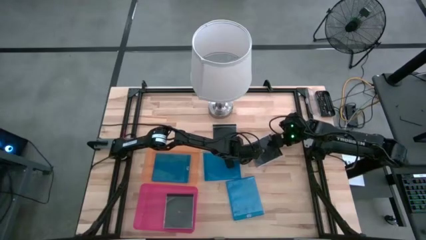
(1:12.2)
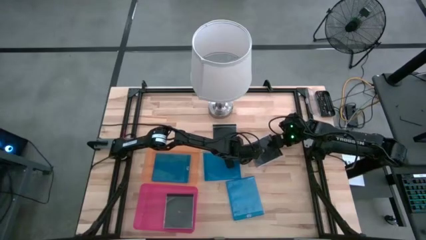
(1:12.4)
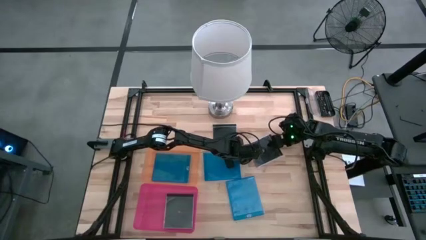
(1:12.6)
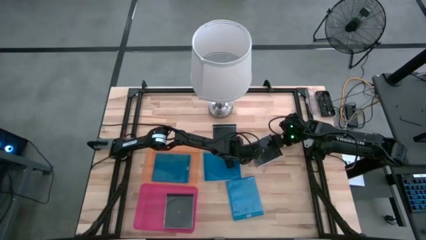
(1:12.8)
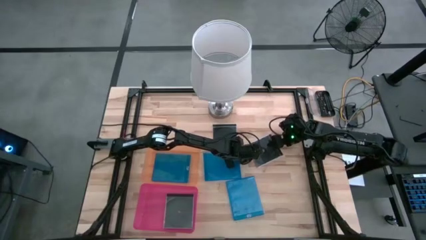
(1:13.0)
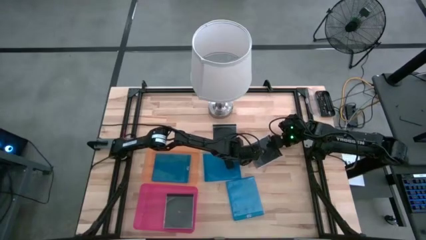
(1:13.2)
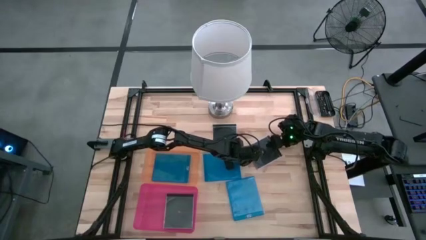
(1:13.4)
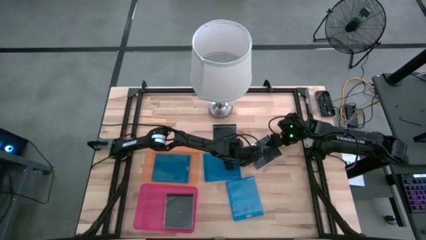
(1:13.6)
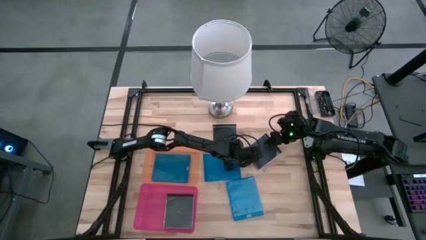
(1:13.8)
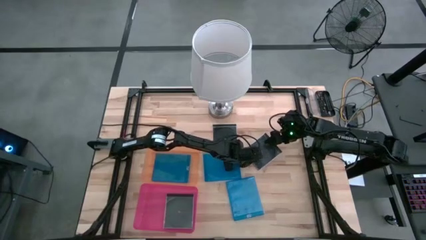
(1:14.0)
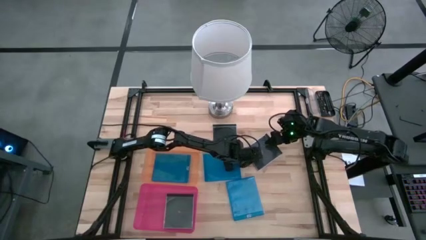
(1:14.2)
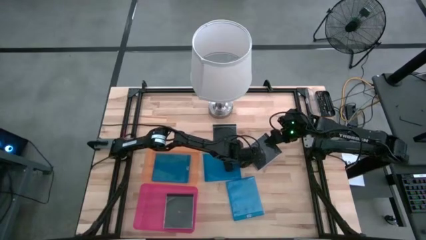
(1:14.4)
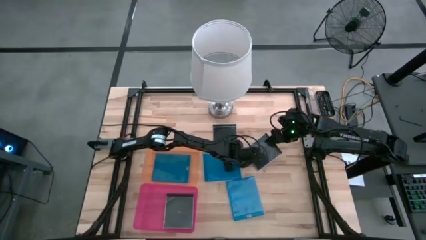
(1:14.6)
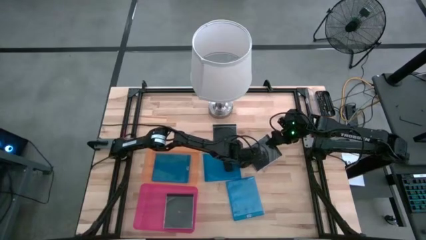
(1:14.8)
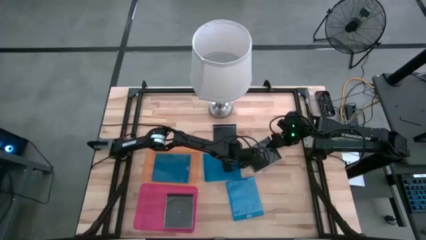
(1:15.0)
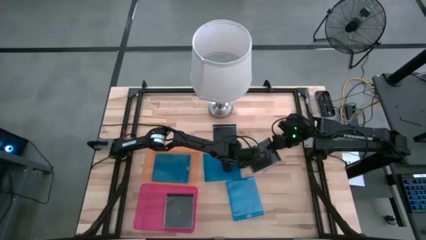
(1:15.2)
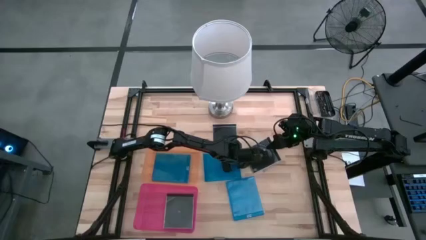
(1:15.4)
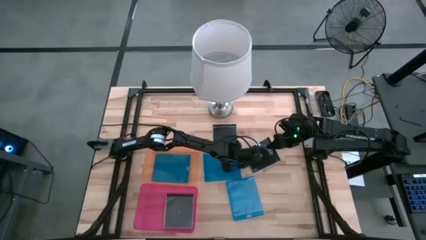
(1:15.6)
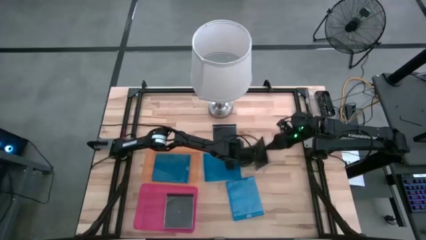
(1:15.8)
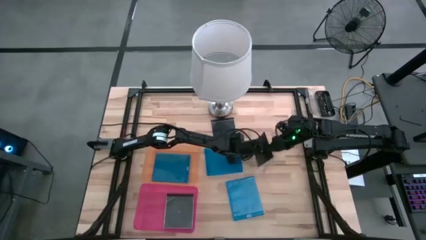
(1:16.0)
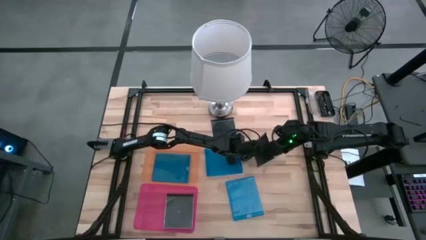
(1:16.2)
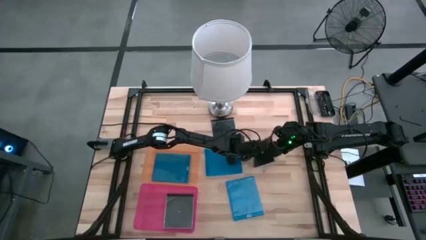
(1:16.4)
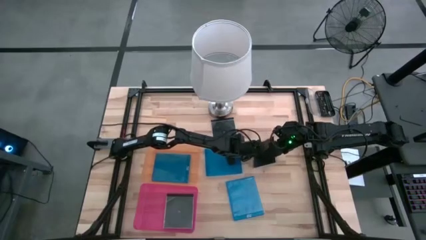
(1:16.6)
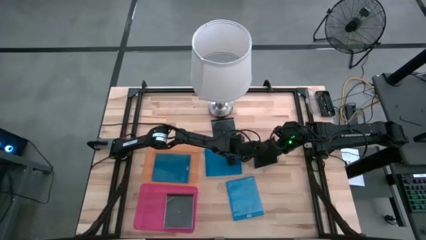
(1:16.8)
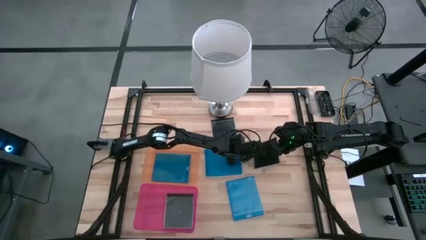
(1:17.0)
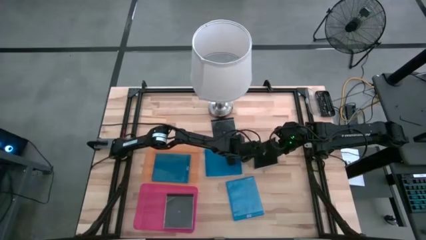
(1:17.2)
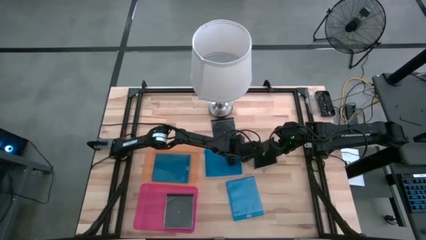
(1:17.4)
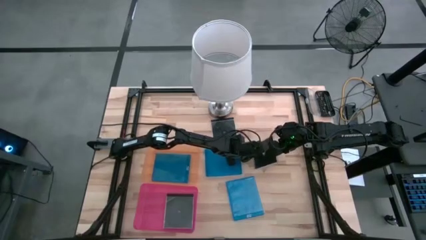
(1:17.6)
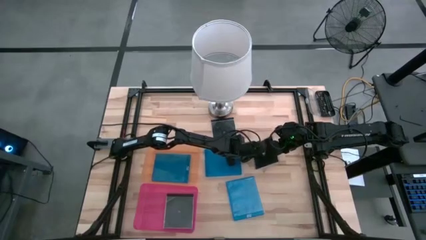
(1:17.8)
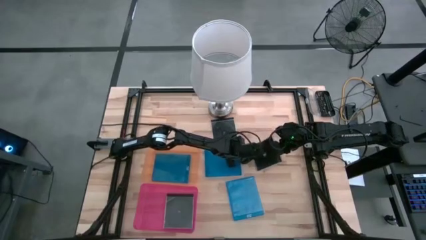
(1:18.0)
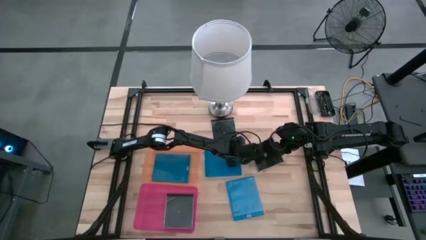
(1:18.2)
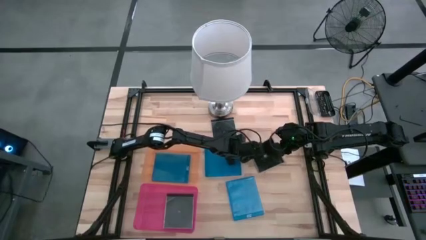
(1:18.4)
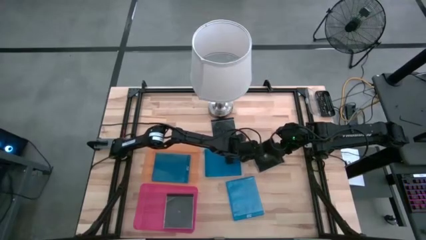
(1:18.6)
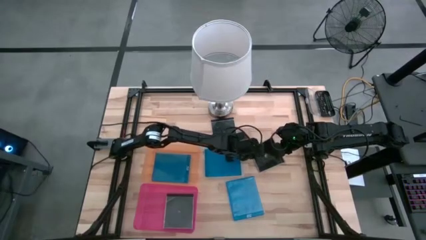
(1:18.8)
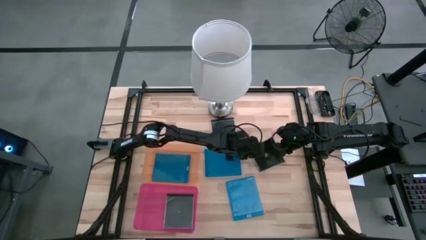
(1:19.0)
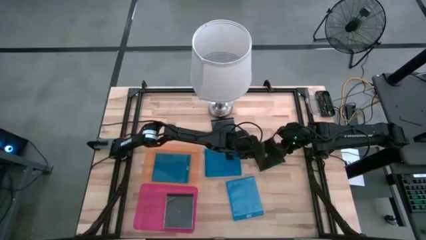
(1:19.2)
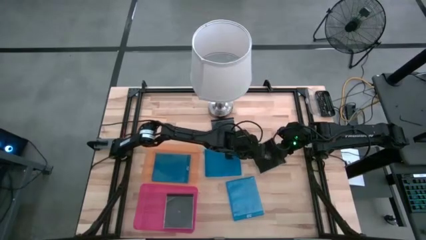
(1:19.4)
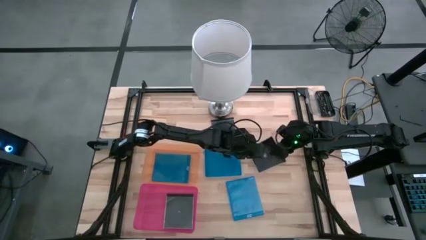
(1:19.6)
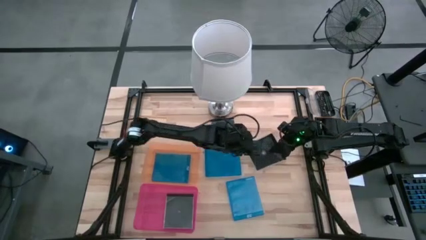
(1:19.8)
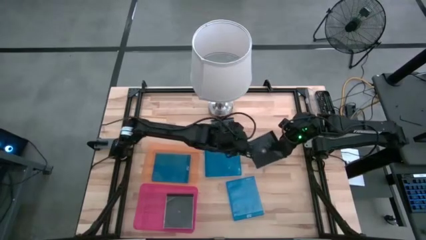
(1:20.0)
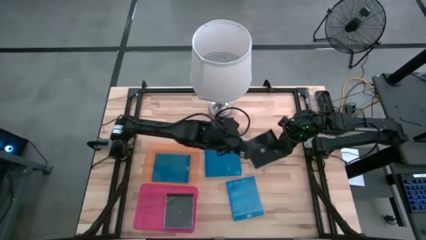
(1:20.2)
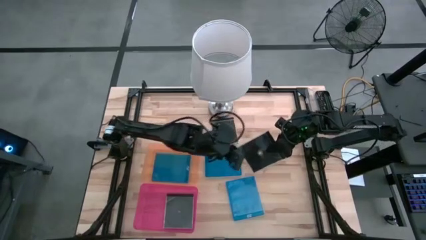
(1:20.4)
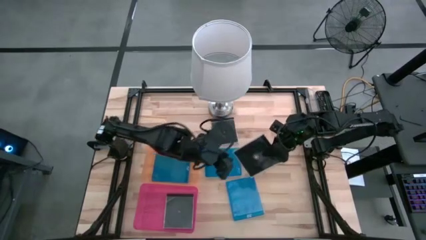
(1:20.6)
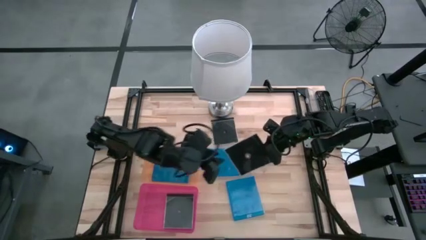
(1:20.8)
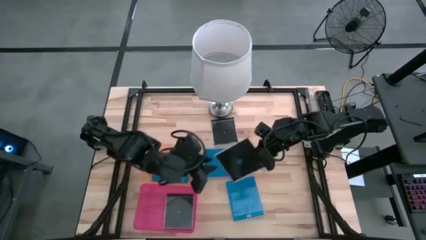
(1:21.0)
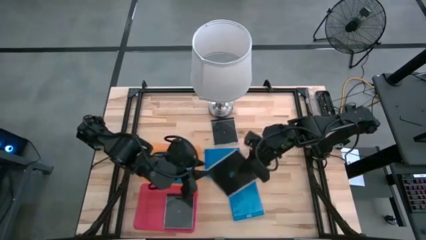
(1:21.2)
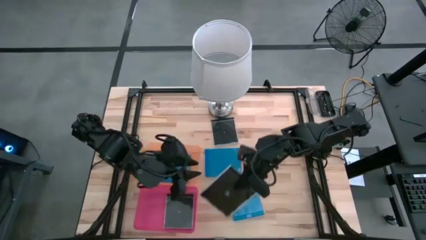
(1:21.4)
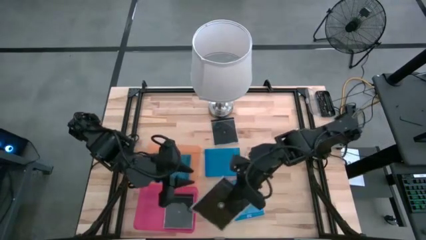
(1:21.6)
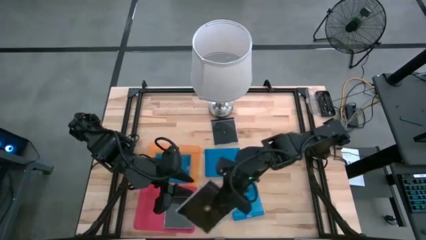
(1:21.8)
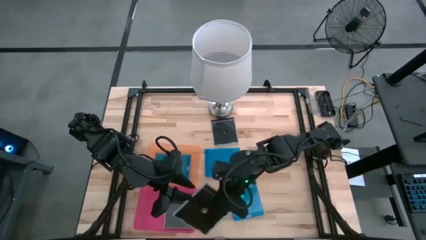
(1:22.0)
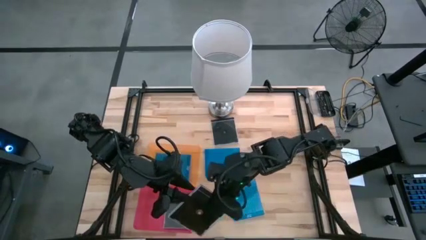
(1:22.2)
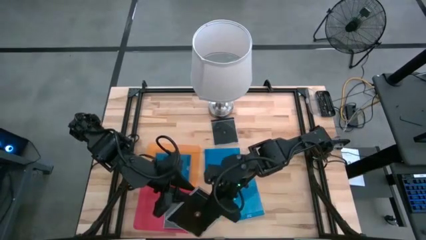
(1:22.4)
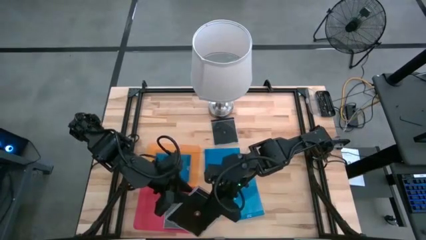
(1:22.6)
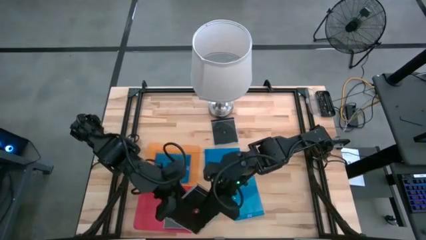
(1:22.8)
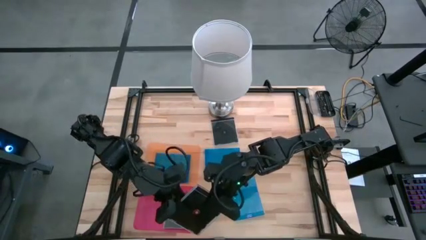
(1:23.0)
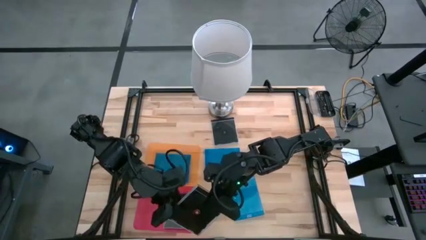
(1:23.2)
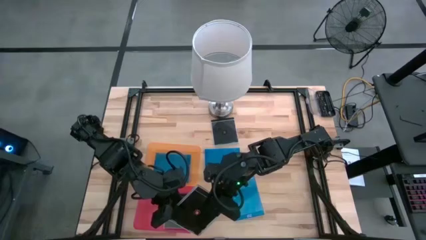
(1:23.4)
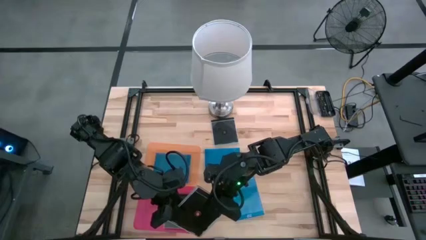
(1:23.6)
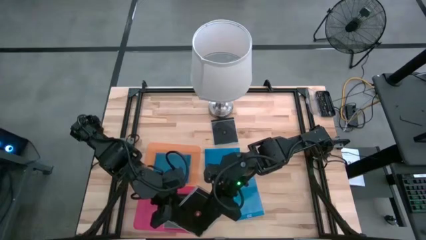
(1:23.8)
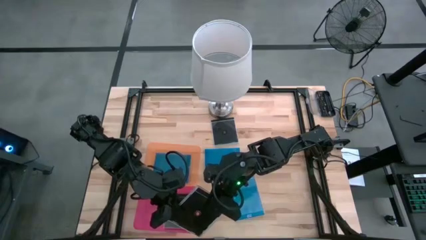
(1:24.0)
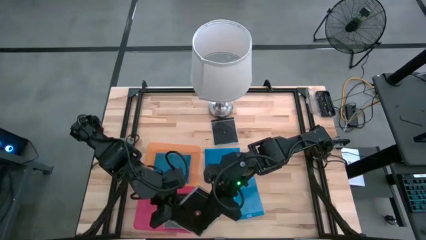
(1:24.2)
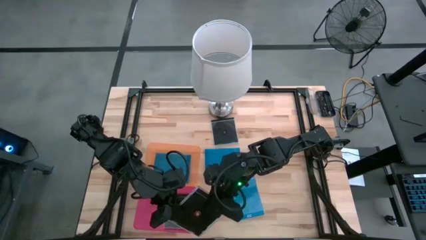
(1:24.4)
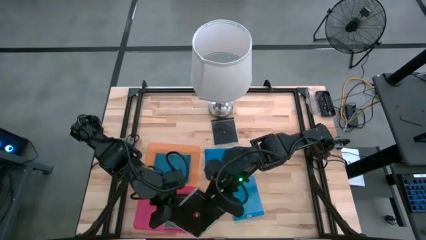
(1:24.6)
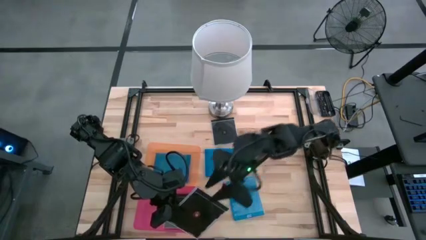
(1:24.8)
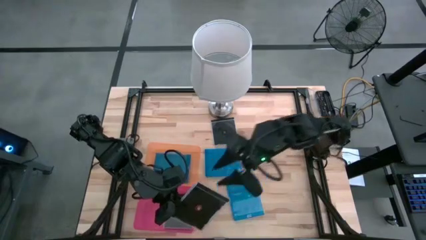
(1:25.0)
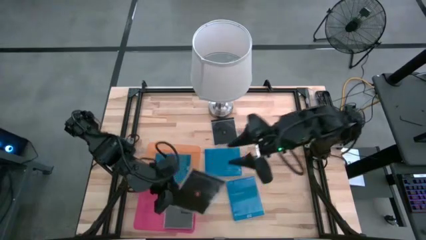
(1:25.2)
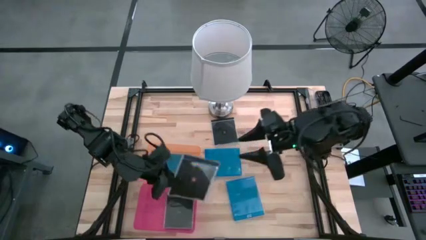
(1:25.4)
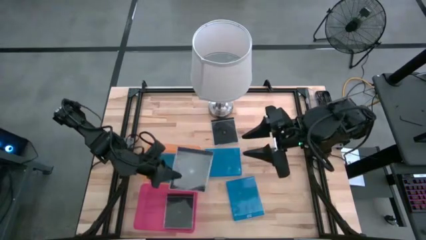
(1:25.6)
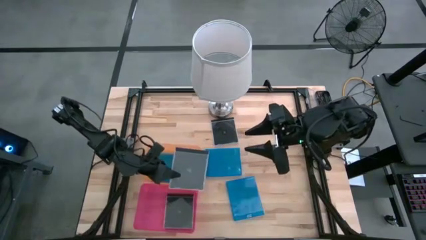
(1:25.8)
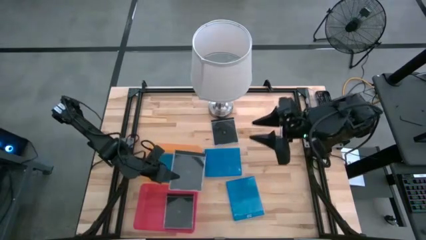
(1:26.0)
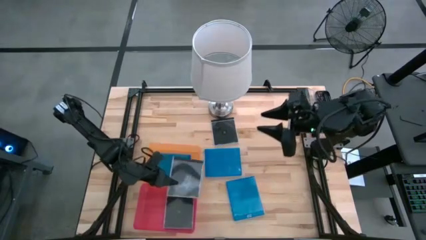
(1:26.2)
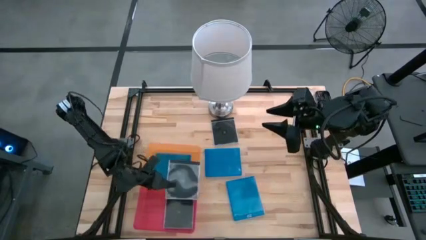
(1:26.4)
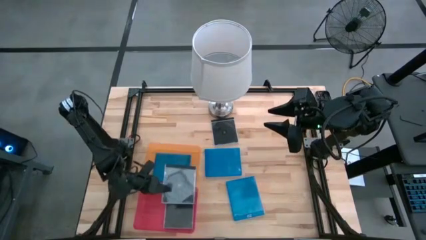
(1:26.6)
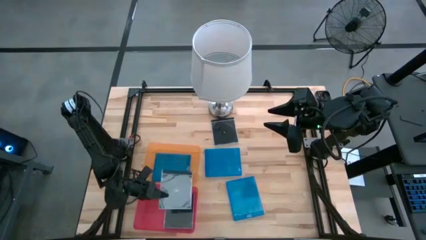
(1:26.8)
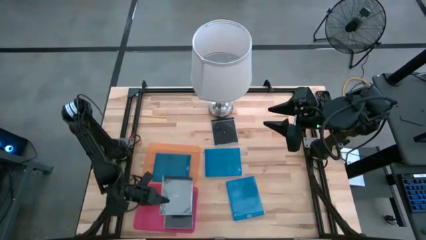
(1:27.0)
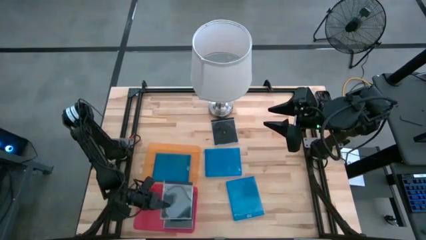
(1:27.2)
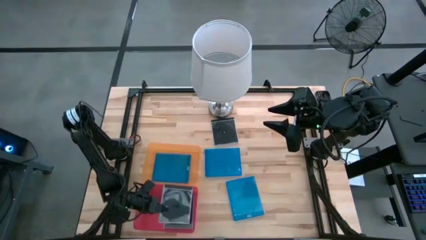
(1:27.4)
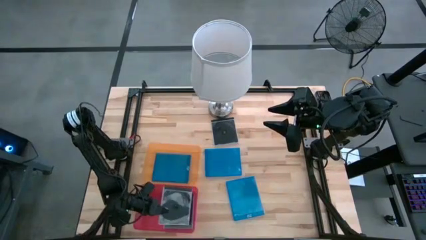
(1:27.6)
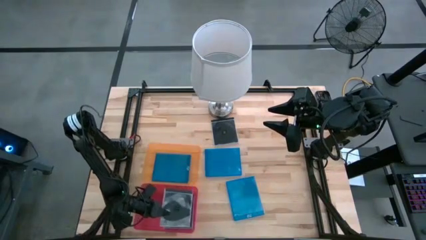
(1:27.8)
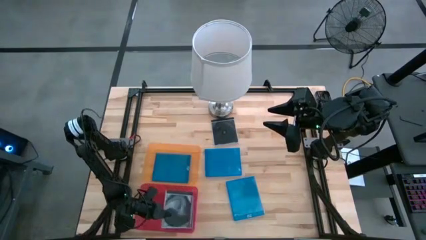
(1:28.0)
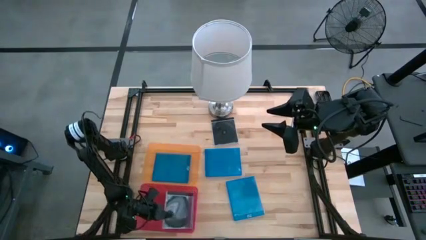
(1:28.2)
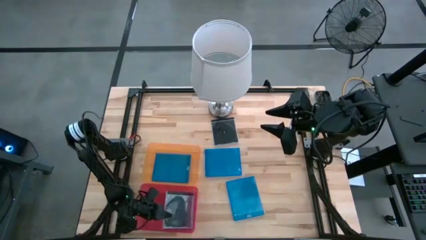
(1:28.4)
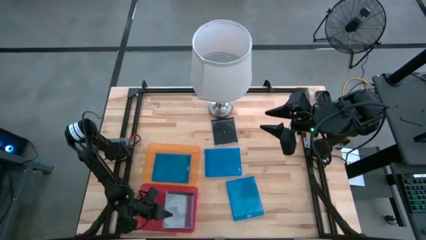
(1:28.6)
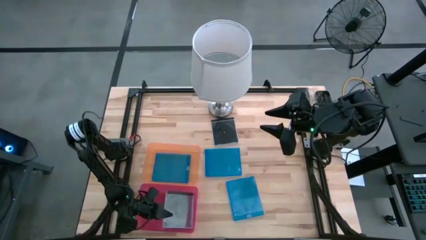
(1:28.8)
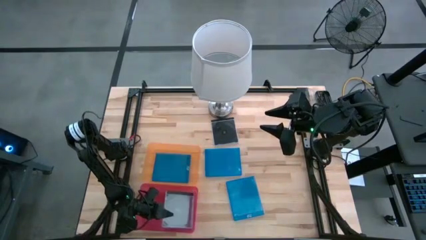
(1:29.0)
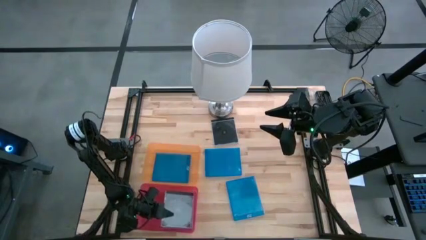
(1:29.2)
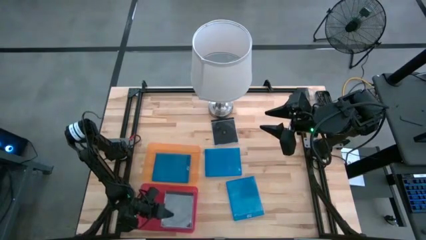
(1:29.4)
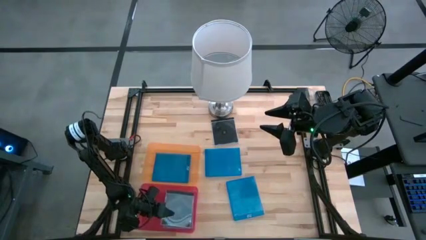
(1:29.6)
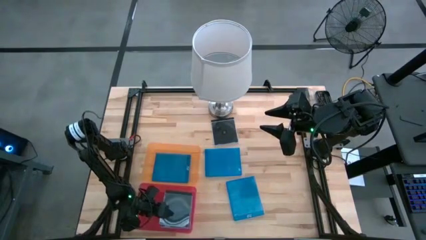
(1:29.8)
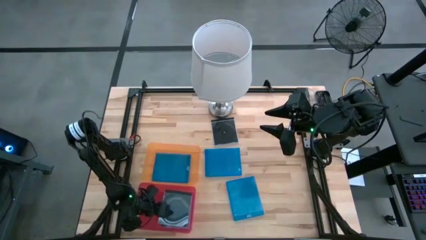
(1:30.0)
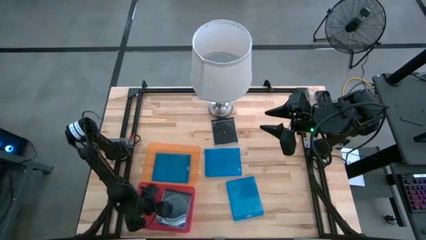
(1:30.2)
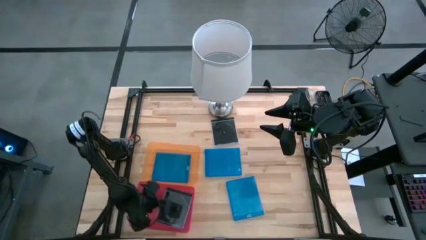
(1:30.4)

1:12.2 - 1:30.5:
Task: Pick & place jewel cases by type
Put the bottom black CD case into the pink bin
